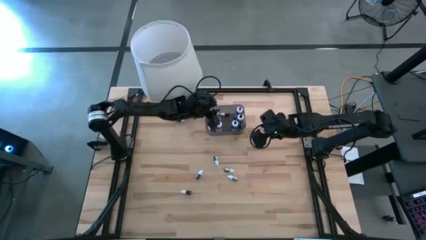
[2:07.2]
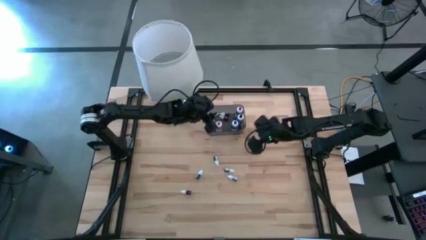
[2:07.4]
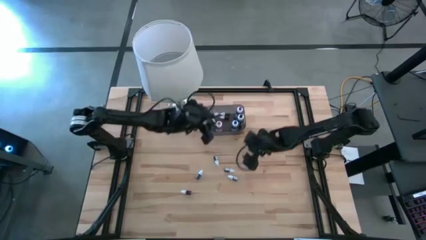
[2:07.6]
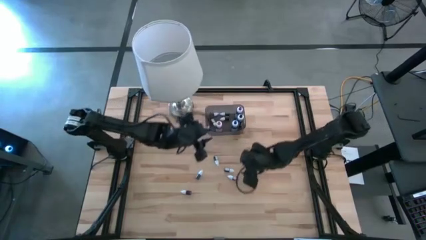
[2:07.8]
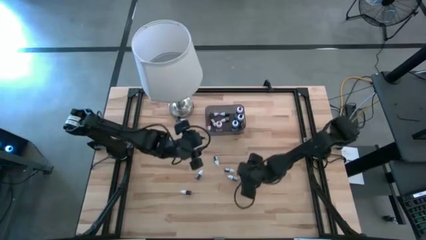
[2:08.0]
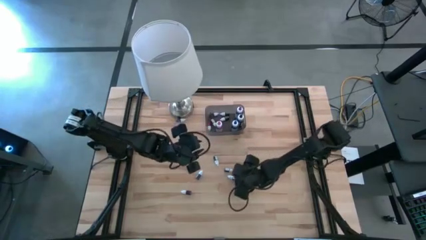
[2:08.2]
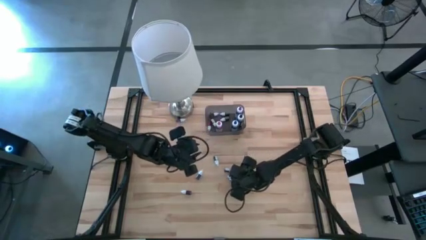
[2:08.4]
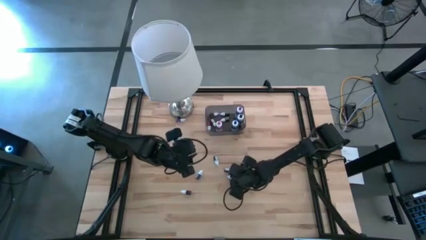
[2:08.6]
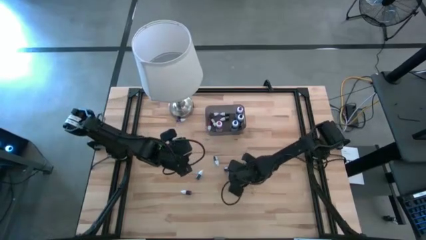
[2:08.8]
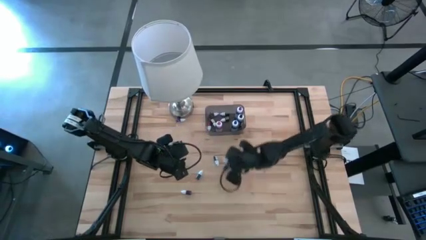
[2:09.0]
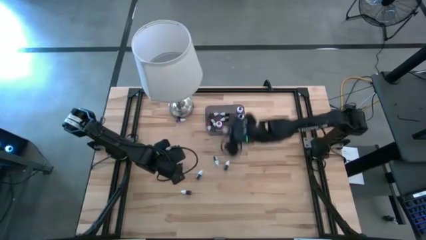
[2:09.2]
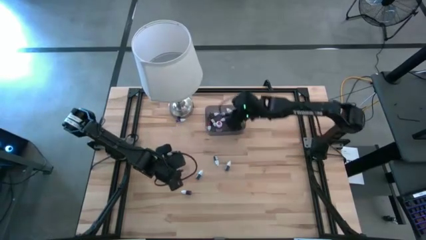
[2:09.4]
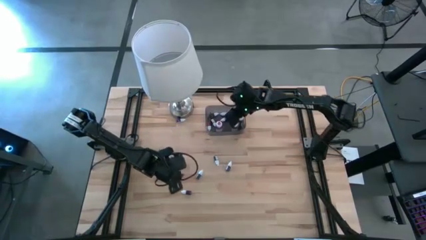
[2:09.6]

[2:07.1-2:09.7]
Task: Pick & Place food coloring
Put the bottom small purple food coloring bottle into the bin

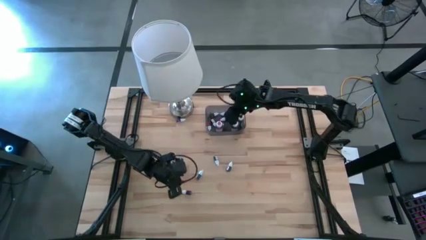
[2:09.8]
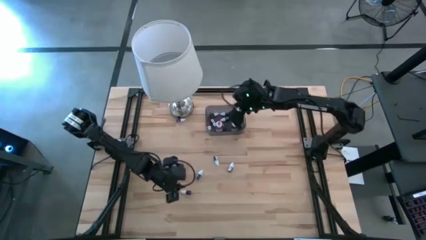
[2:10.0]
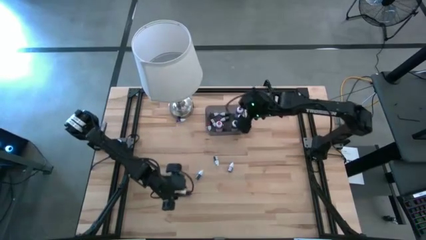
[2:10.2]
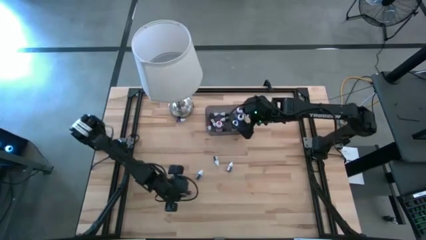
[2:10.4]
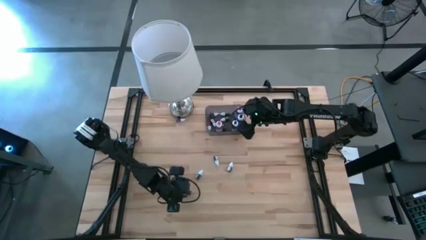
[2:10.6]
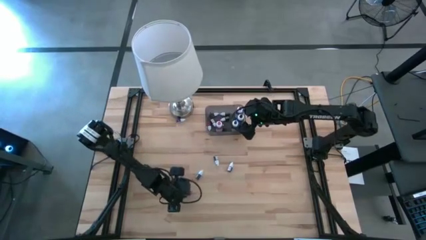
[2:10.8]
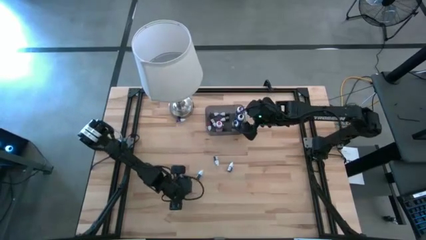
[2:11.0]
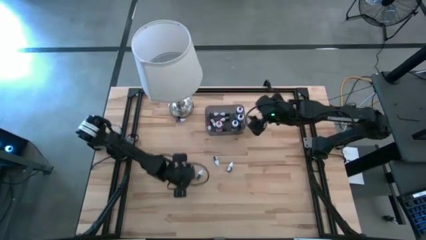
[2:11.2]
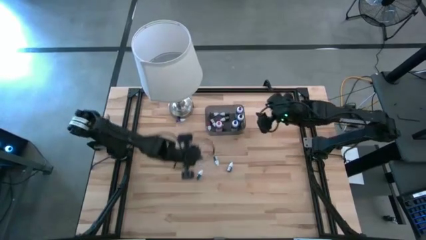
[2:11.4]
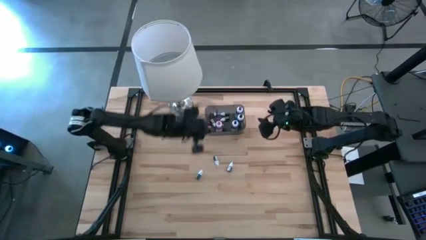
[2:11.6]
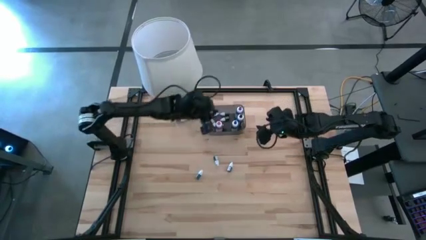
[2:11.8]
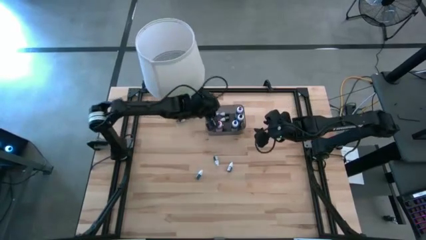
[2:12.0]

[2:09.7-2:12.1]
Put the small red food coloring bottle into the bin

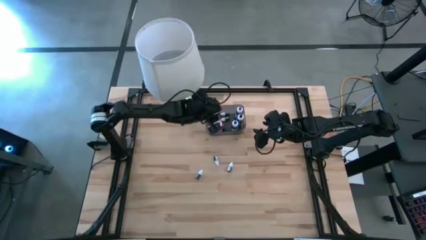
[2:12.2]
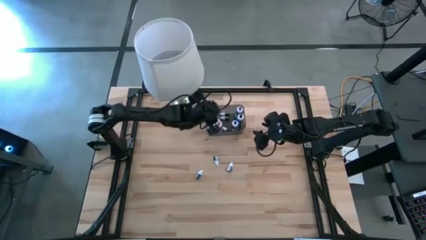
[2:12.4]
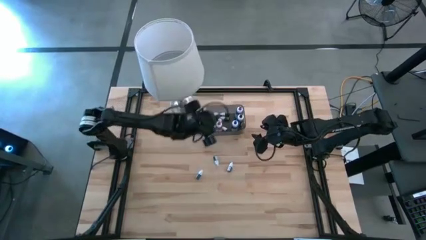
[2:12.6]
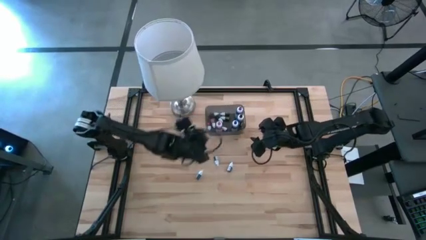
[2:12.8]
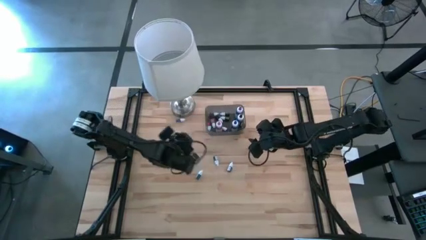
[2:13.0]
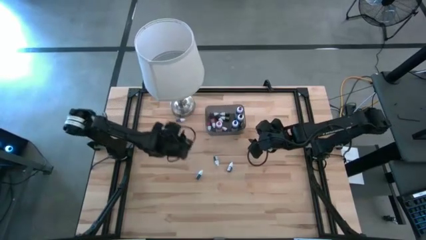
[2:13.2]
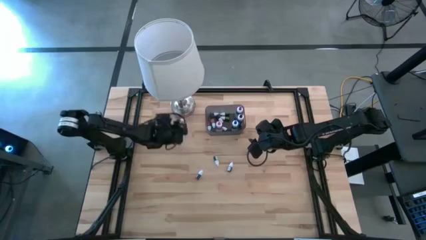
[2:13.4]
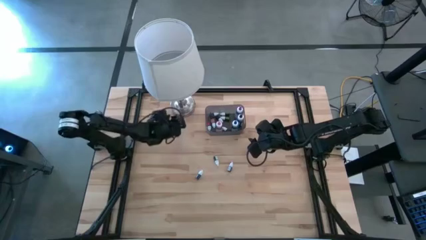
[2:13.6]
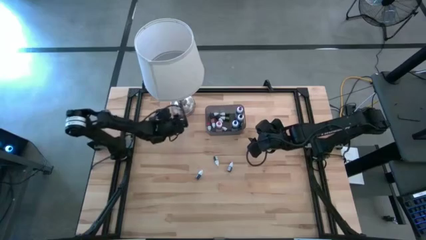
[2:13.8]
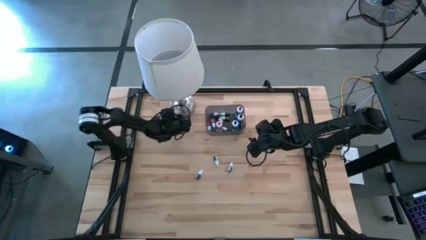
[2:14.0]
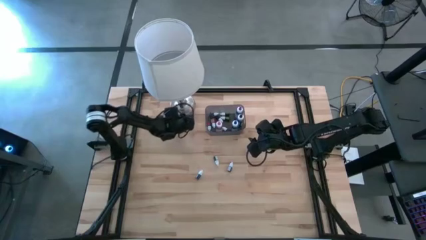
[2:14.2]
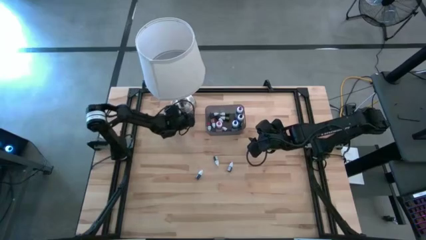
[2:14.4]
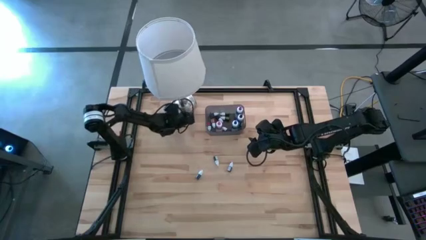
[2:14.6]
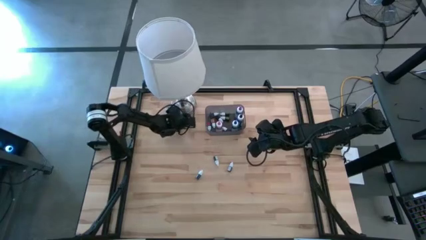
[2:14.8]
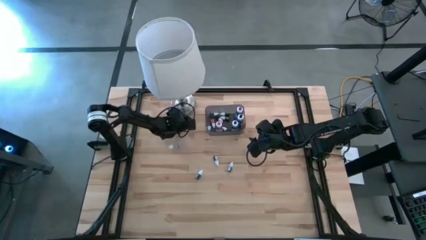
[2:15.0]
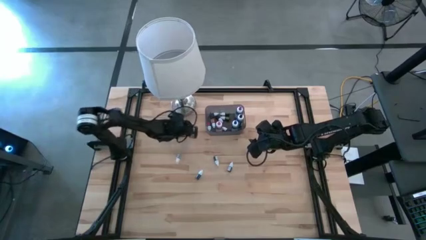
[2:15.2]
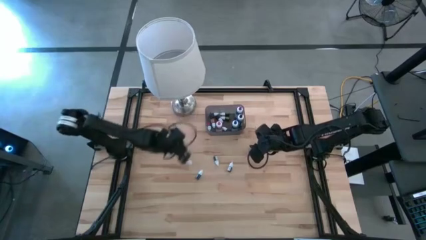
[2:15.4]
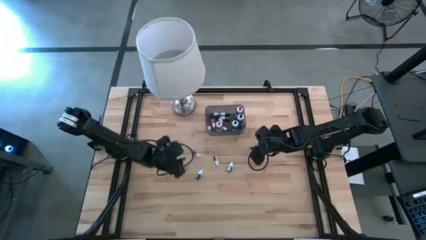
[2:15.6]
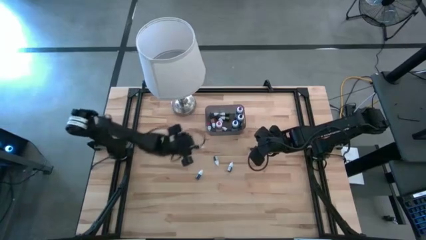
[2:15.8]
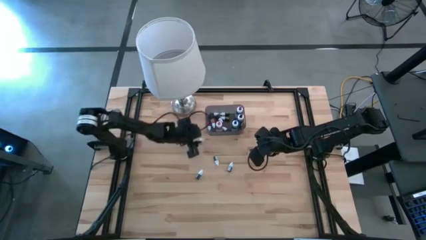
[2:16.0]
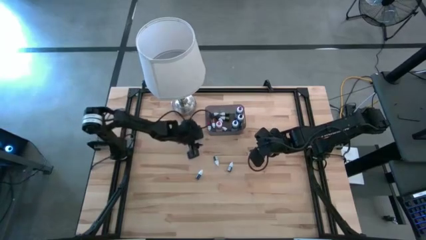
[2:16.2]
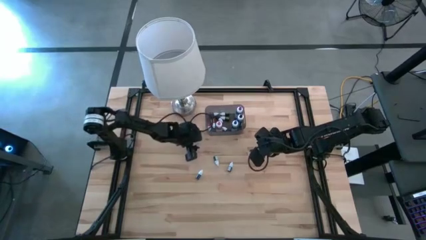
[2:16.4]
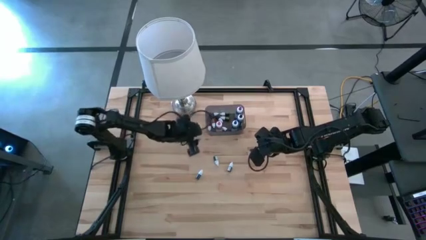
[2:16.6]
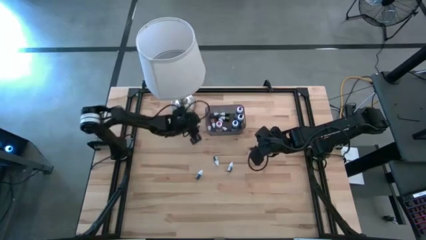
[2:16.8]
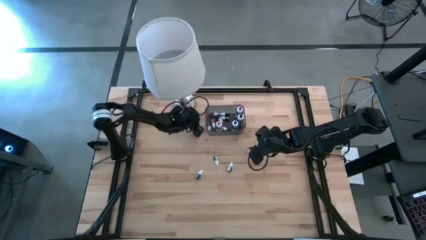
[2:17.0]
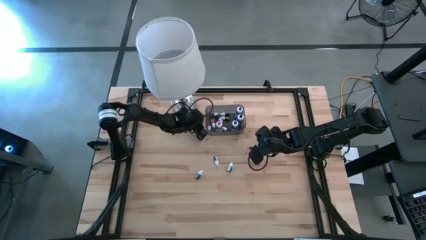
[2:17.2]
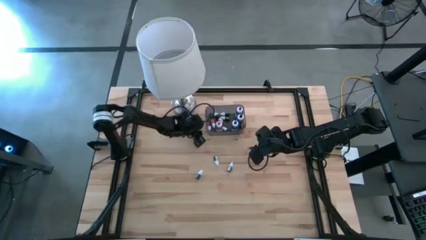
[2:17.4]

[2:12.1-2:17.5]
Put the small purple food coloring bottle into the bin

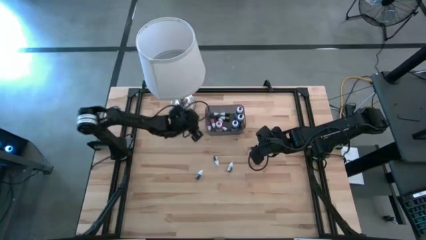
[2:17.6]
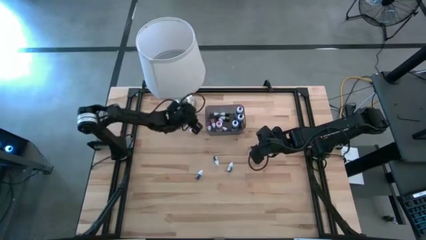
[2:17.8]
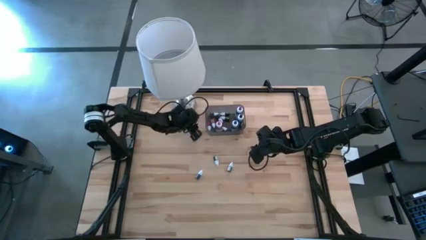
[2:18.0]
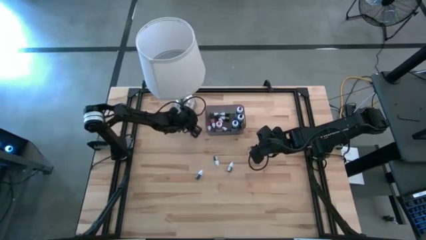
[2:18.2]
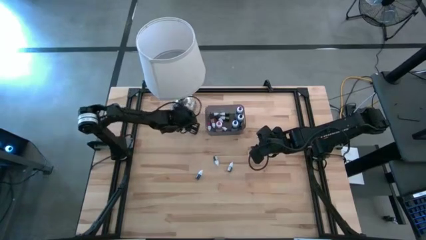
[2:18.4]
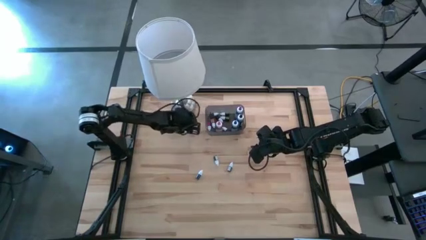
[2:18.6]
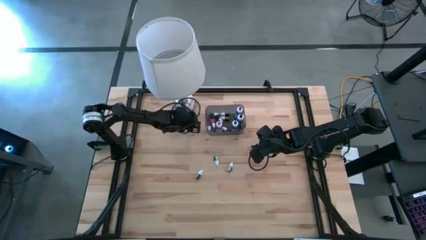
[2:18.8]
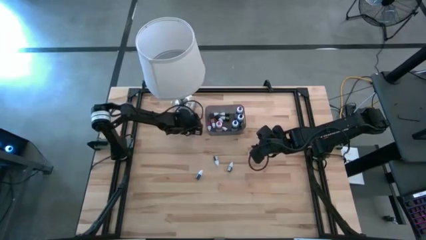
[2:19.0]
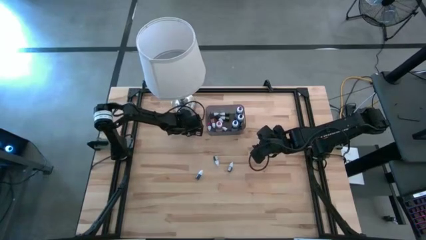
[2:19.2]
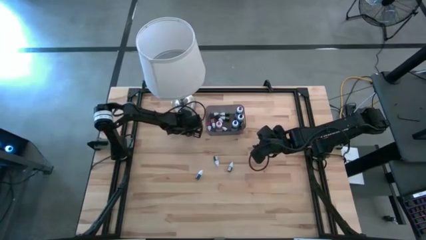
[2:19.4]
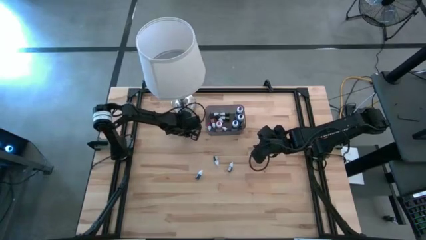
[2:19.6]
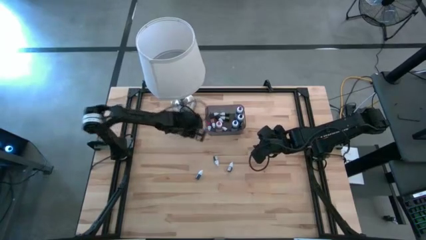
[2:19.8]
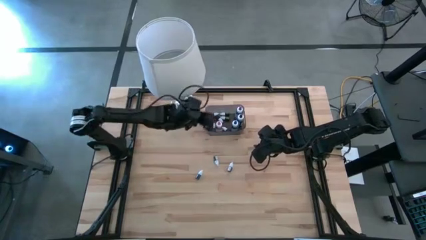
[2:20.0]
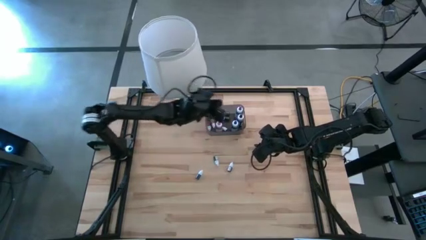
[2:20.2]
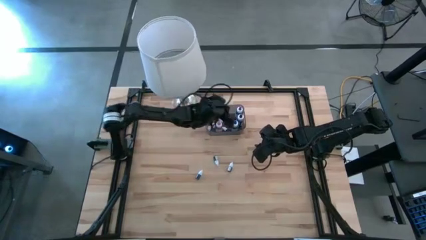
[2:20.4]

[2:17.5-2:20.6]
Put the small purple food coloring bottle into the bin

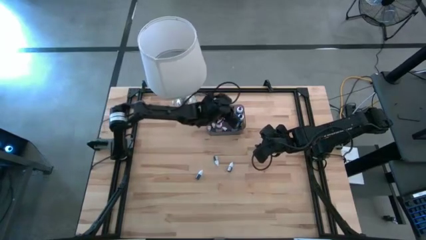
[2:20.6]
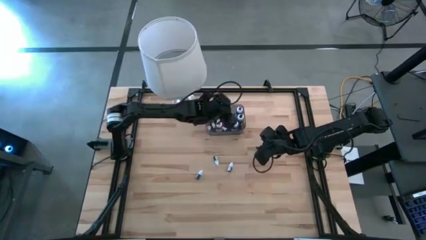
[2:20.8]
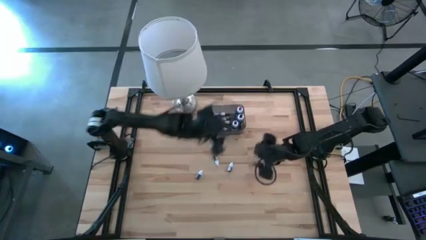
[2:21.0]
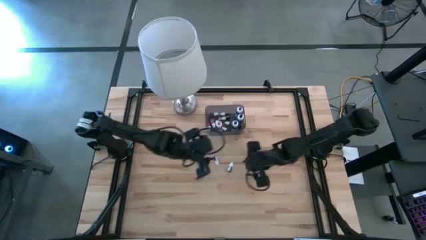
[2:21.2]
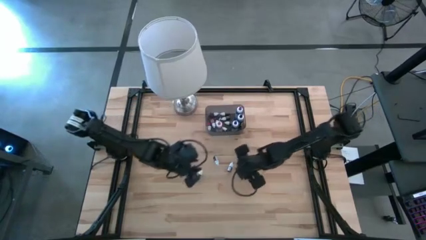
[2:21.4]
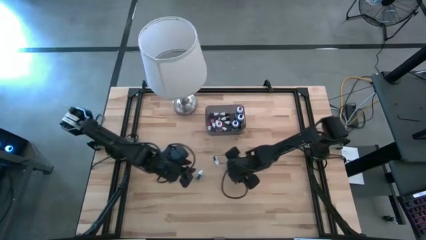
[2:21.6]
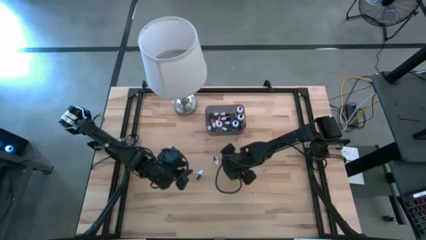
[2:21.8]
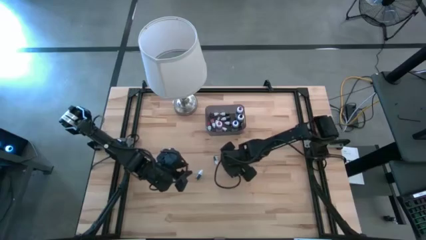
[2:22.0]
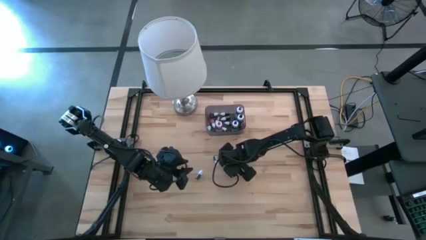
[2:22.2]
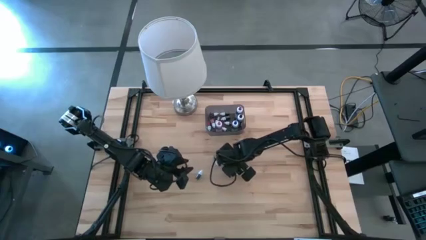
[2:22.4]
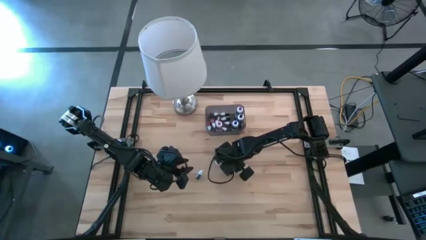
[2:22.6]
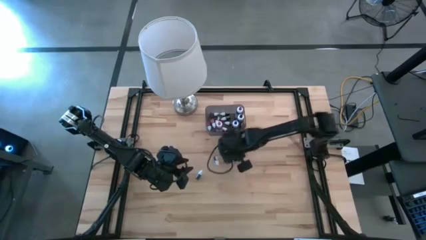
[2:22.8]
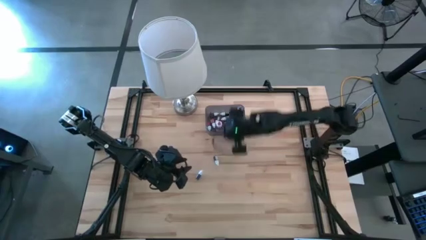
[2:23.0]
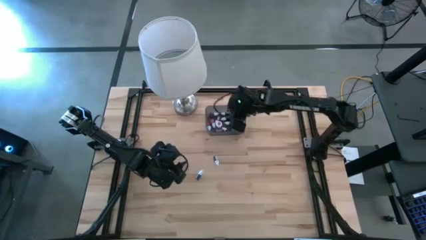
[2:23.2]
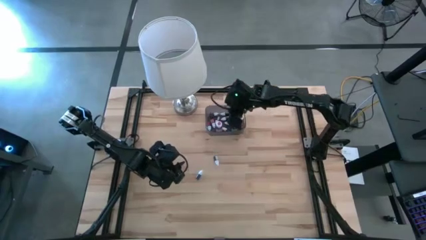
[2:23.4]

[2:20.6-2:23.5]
Put the right small black food coloring bottle into the bin
